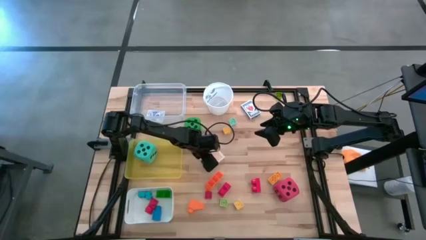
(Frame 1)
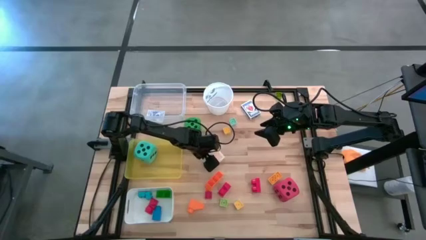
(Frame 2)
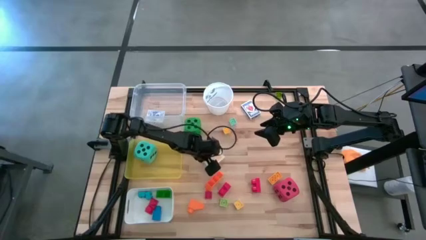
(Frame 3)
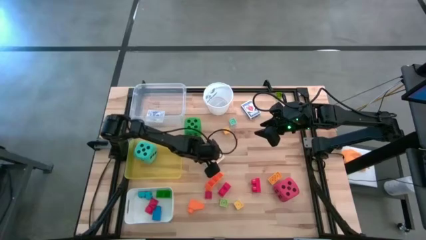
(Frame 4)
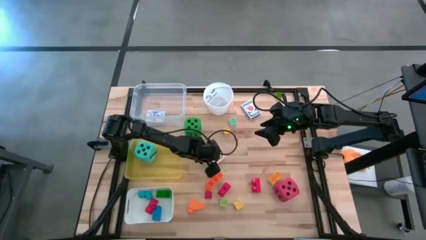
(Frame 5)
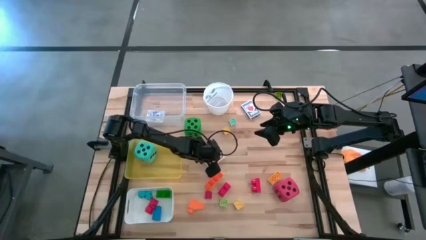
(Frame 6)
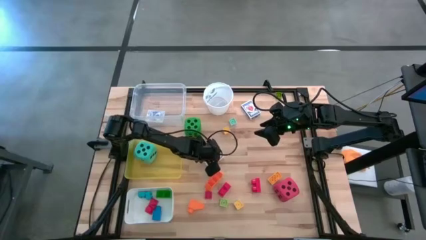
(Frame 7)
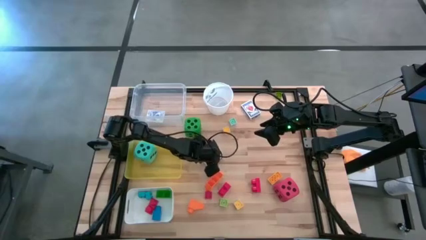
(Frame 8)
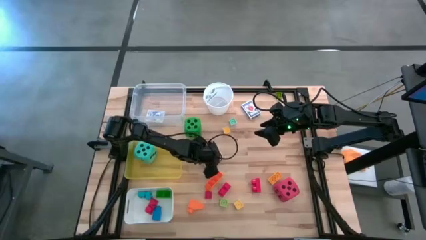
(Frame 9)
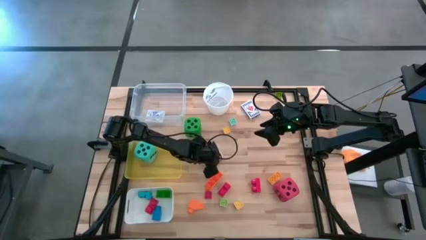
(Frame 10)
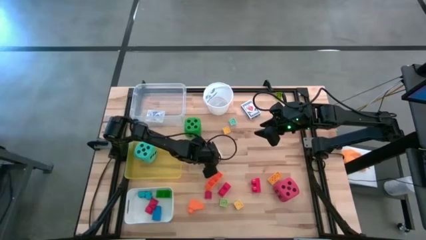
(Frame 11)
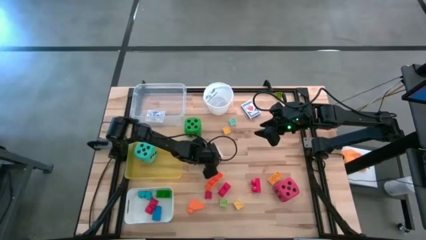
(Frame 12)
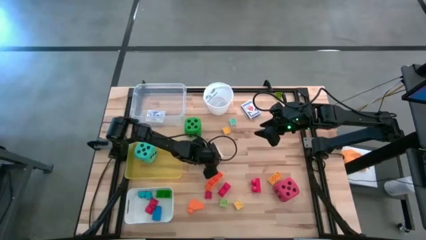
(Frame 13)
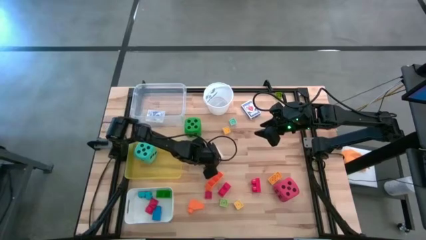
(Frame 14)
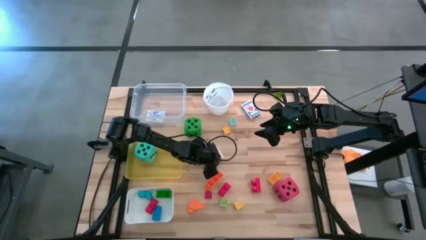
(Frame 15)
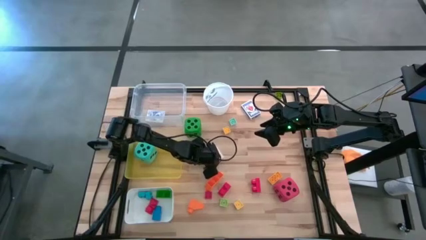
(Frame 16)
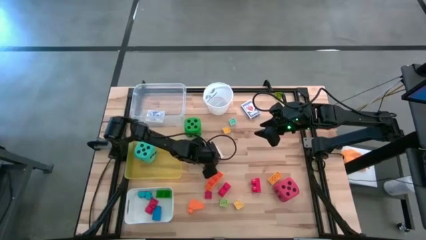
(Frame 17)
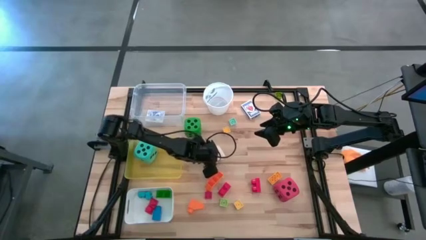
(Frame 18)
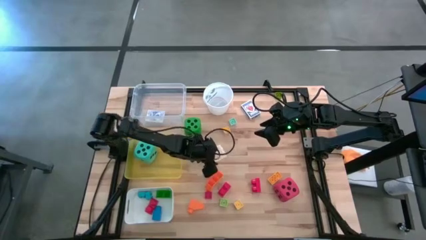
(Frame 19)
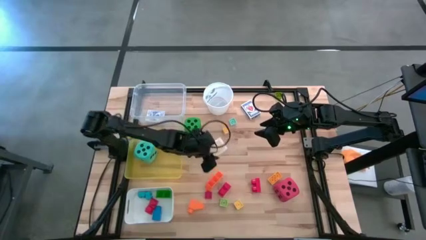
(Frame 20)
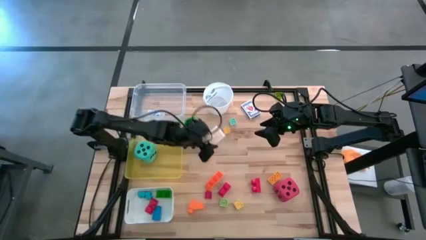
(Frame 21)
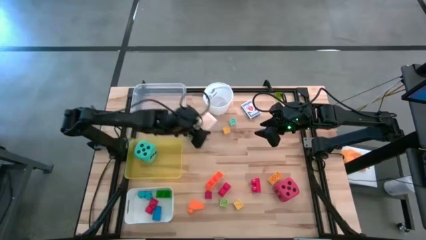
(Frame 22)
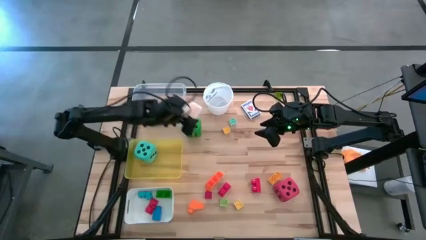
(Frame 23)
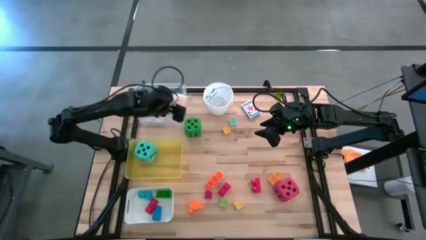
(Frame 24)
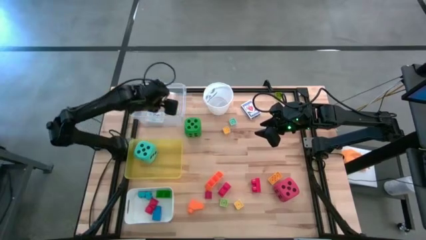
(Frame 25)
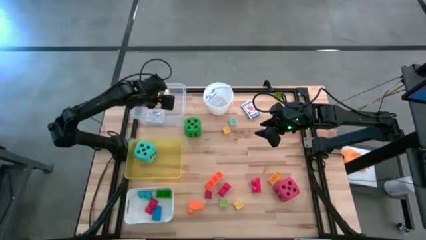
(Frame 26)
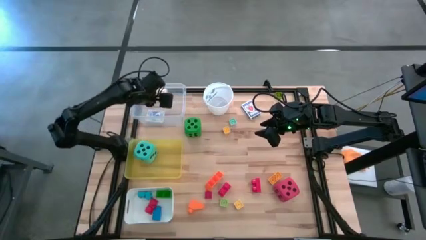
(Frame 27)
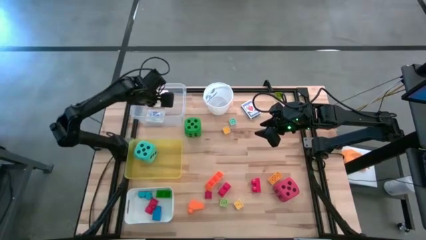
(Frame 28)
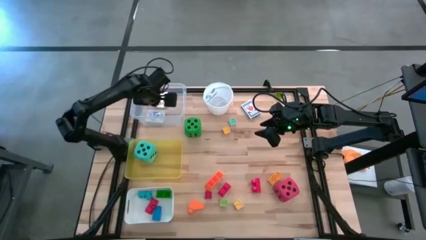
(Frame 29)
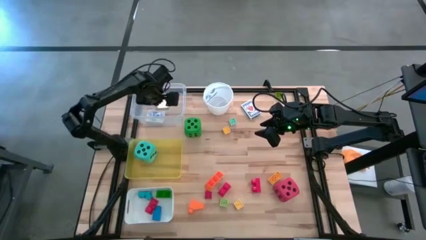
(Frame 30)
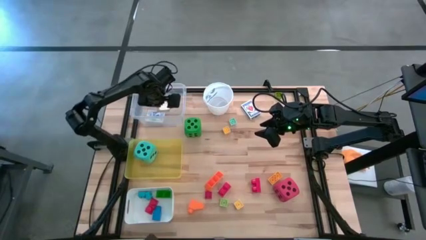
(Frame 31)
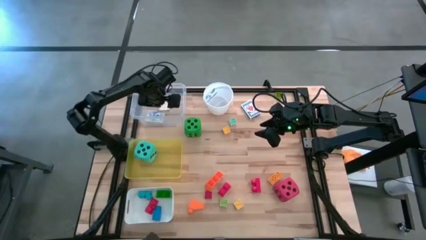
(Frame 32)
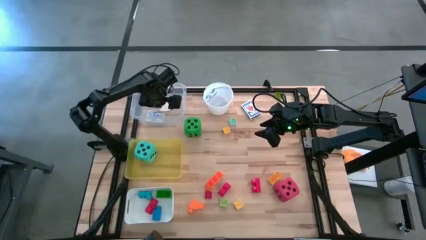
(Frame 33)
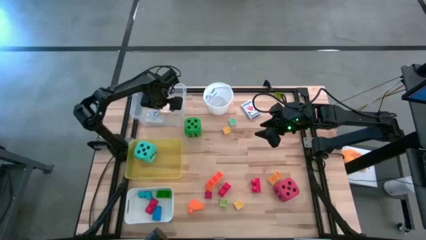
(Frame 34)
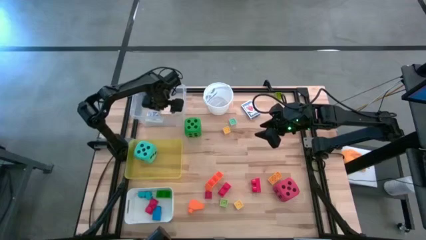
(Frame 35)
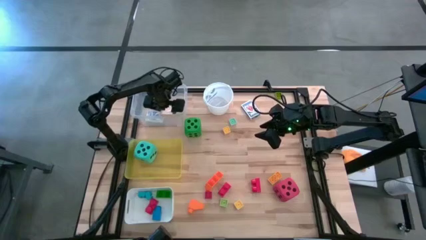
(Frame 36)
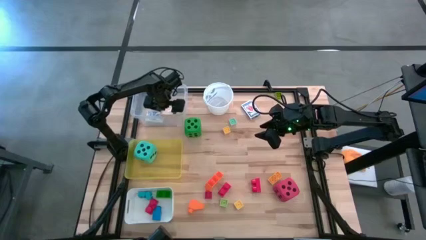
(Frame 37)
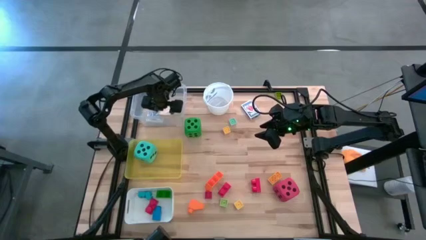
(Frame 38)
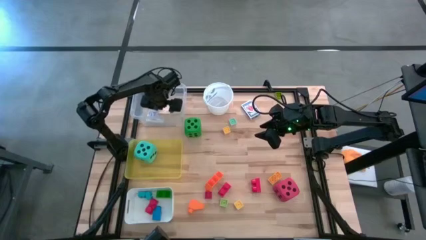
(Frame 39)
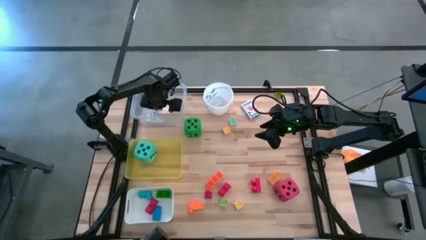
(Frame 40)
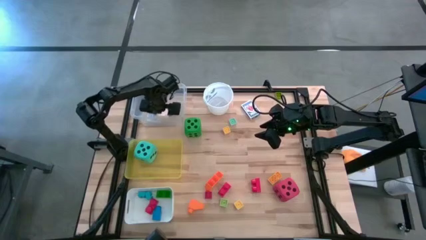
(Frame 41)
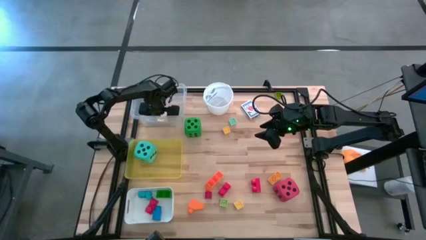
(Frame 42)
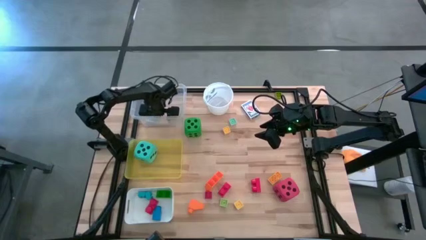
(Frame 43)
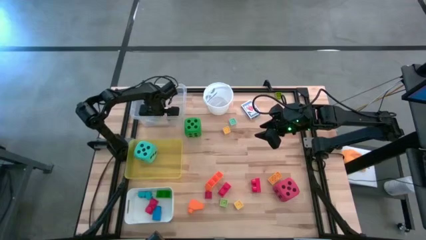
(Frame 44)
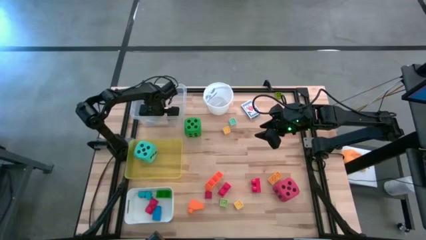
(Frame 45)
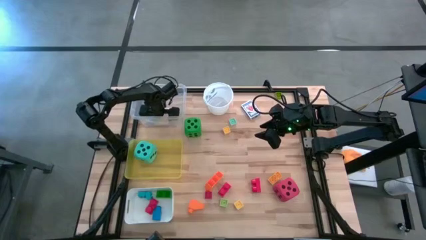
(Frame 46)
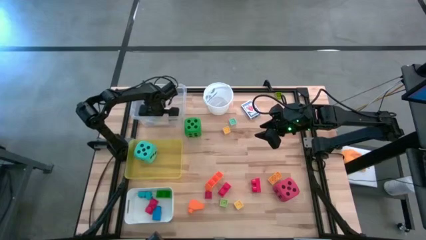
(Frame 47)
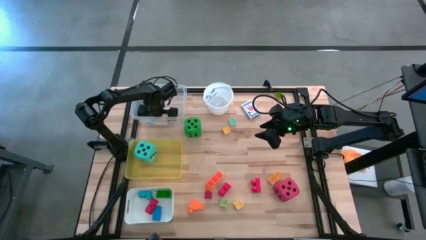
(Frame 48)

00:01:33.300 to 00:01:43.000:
Task: Pick & Place Toys
Put the yellow deck of cards into the transparent bin

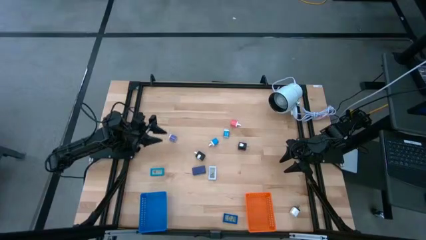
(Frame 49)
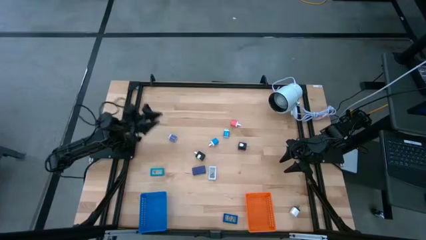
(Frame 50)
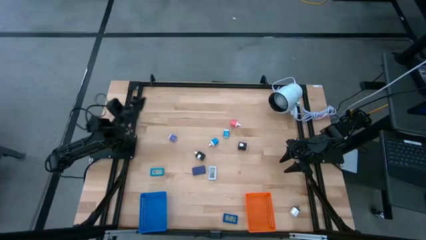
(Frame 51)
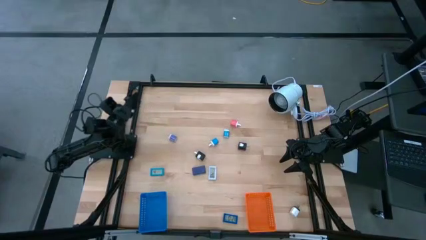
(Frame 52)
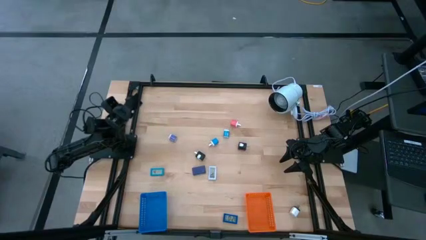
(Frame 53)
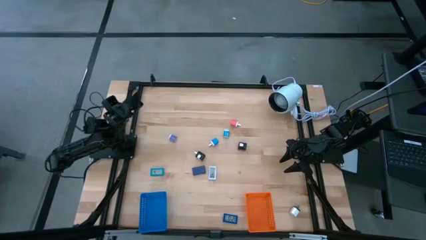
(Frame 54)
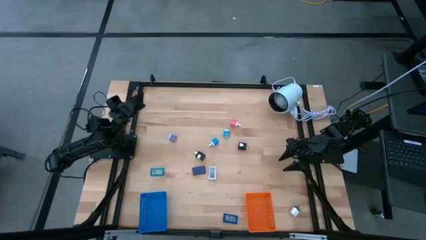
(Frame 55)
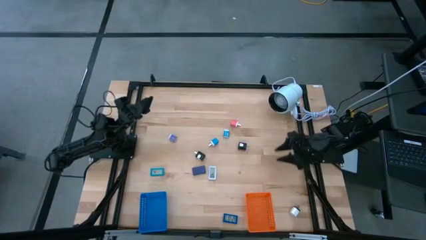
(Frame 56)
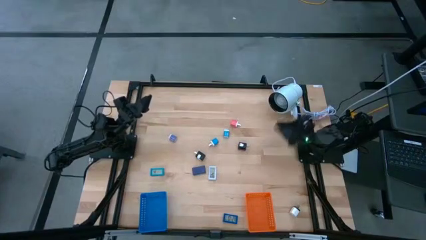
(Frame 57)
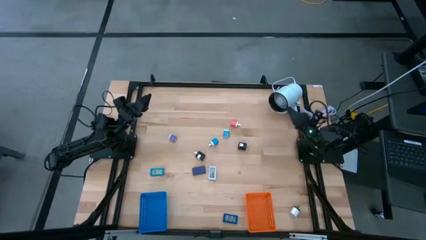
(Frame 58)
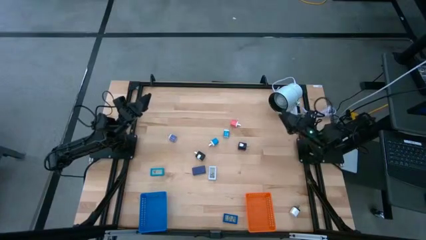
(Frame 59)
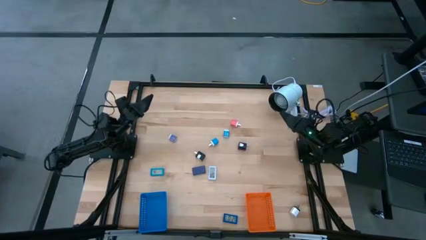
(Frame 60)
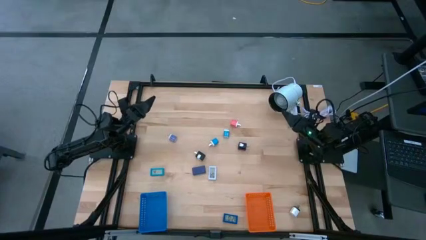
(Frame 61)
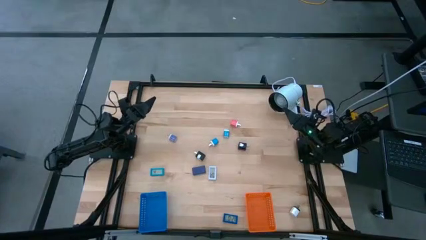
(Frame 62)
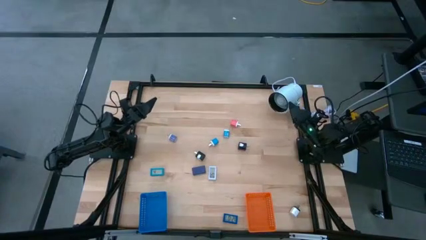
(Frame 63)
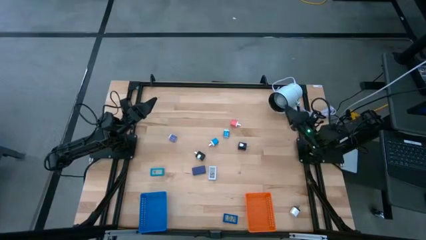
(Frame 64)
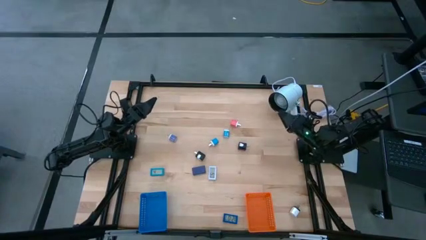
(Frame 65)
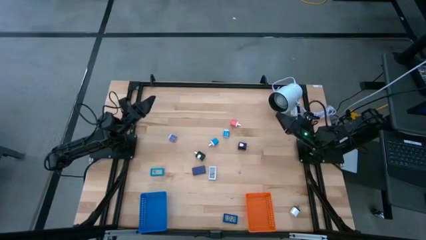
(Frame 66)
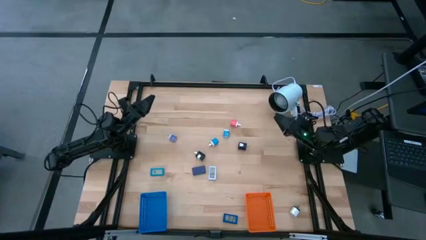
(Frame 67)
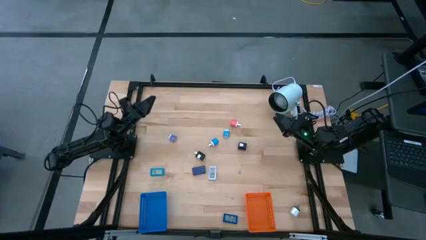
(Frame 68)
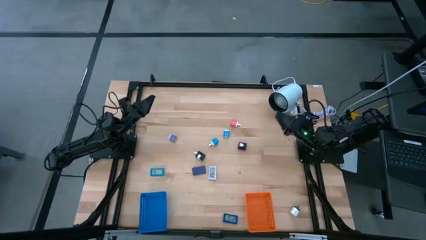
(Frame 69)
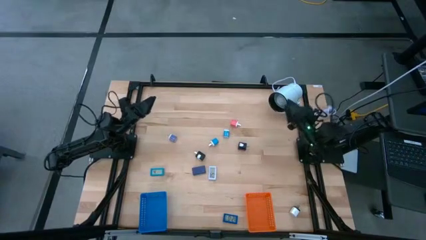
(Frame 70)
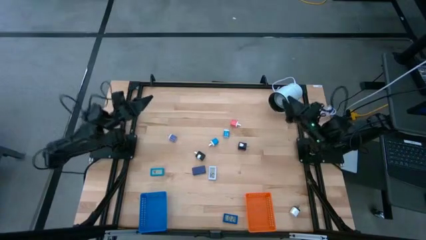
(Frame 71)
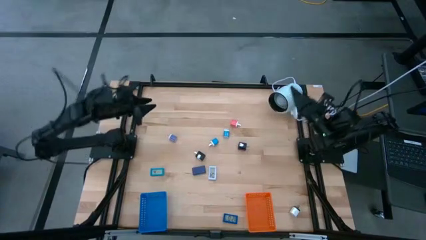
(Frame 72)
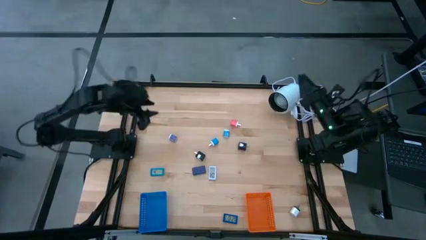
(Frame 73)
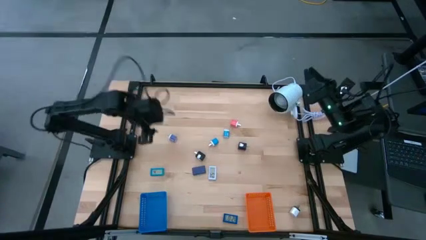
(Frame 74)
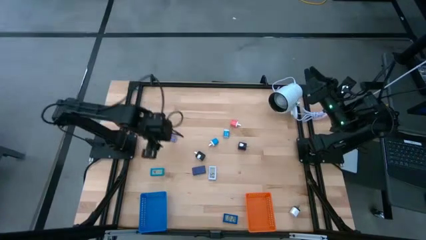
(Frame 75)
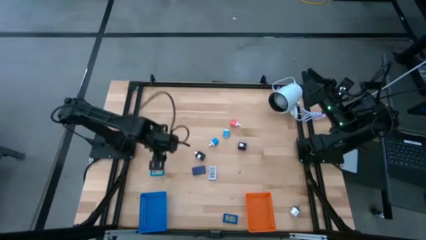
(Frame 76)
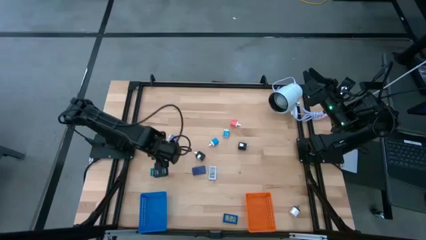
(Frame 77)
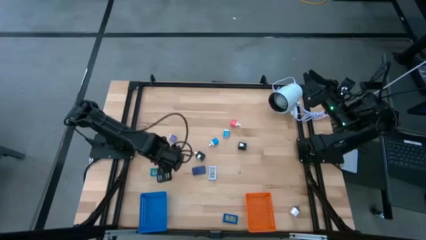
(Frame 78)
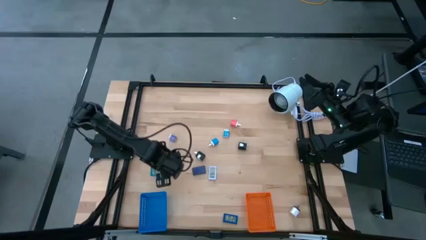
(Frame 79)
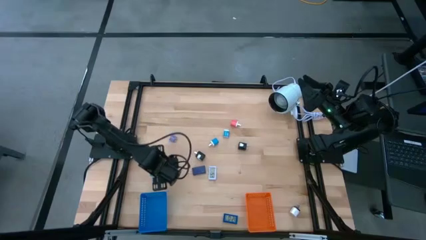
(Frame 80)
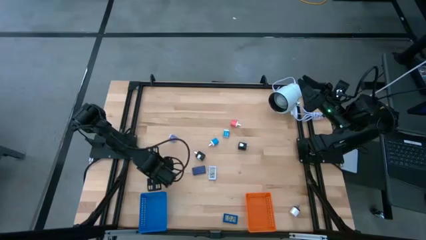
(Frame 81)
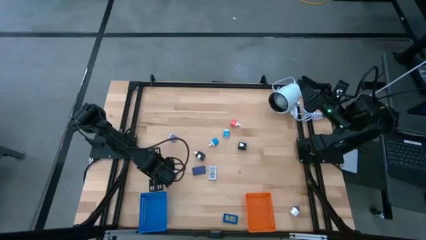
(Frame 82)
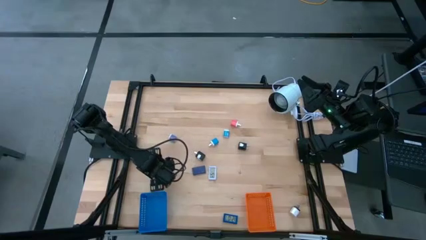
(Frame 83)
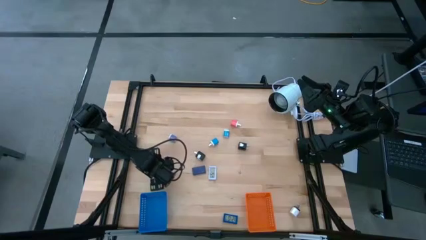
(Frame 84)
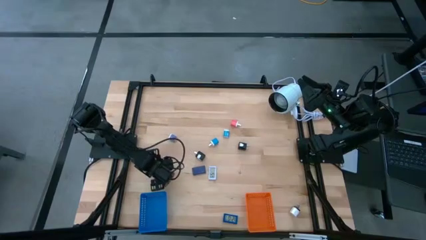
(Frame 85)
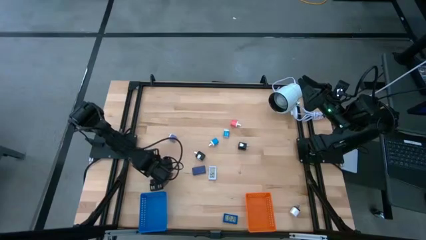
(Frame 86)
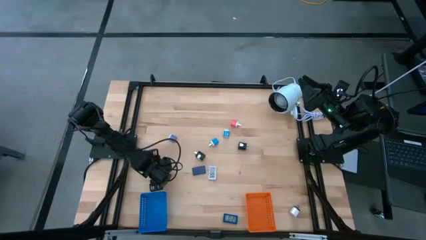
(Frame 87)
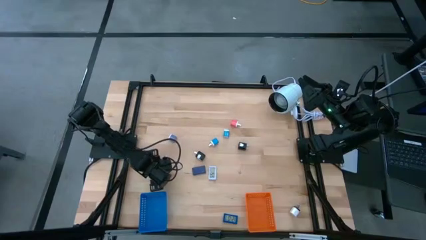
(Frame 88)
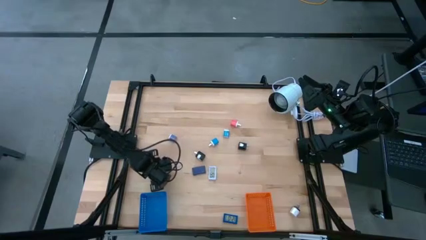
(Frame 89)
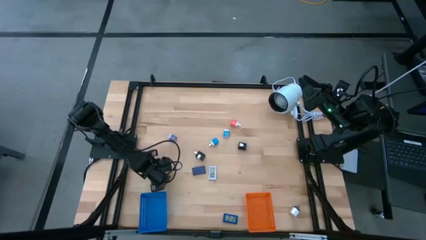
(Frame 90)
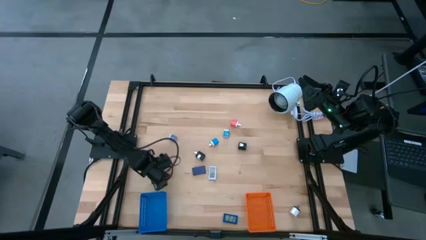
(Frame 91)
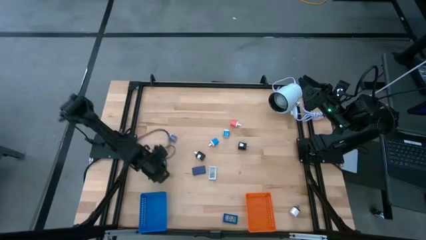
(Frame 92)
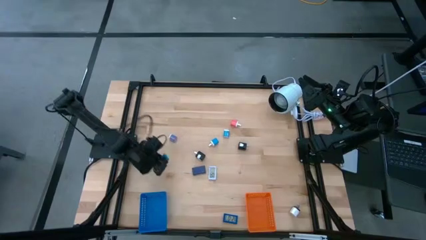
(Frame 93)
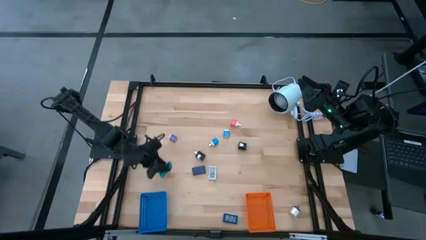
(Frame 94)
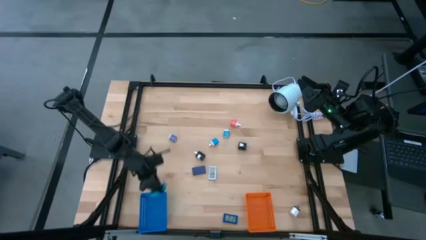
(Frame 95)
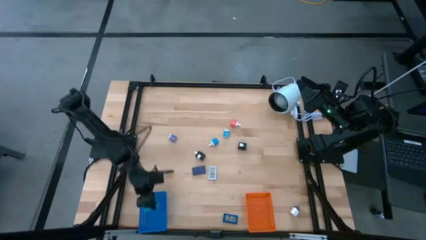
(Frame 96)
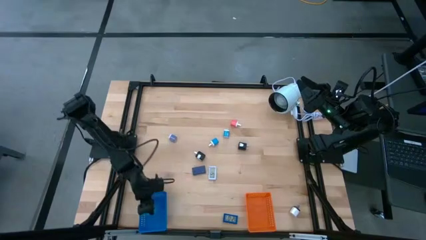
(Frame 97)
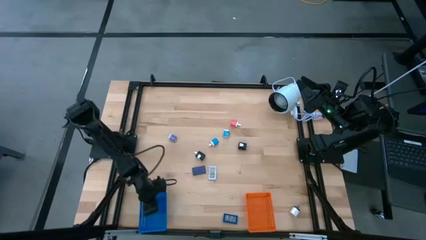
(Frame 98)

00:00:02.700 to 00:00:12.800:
Task: Pick & Place Office items
Put the light blue digital clock into the blue bin
